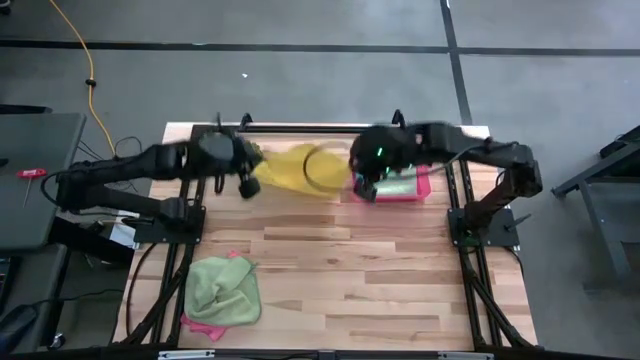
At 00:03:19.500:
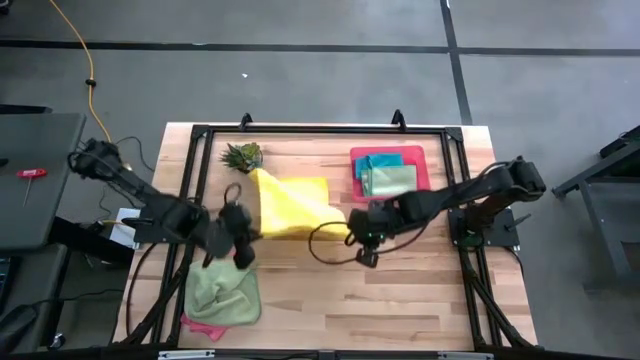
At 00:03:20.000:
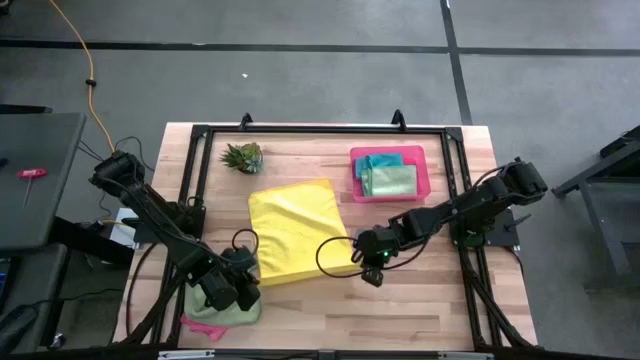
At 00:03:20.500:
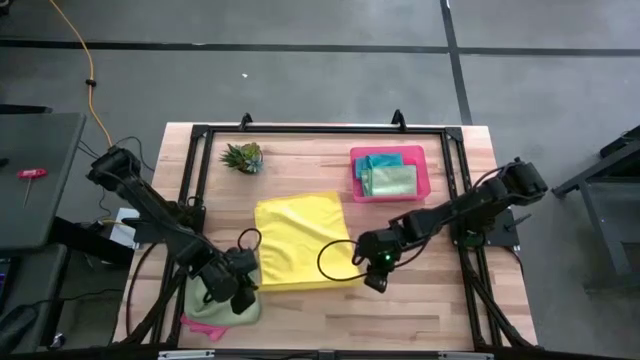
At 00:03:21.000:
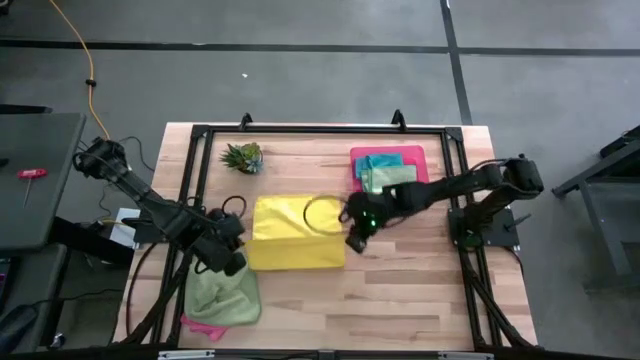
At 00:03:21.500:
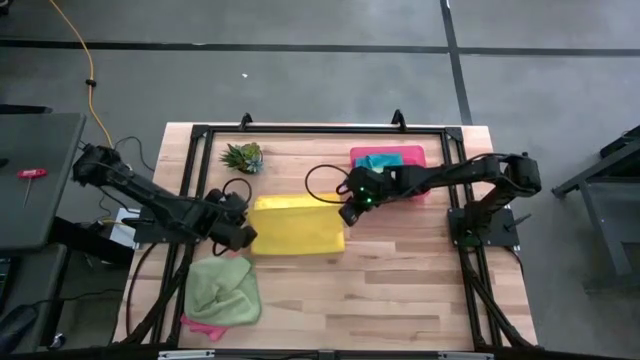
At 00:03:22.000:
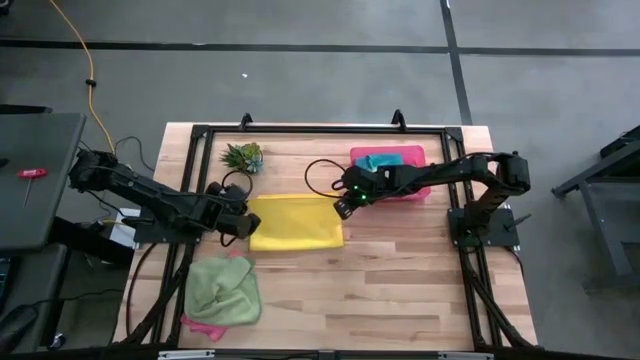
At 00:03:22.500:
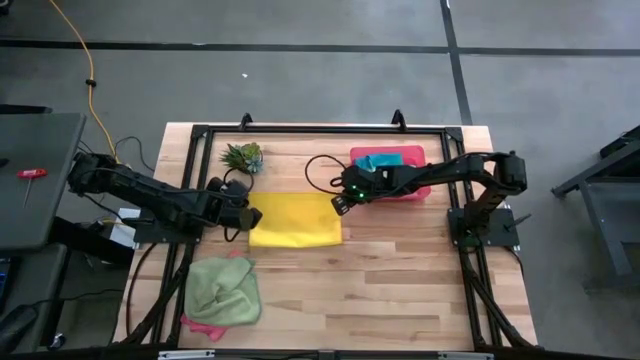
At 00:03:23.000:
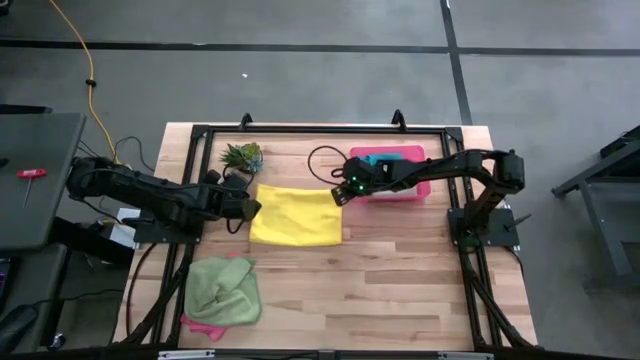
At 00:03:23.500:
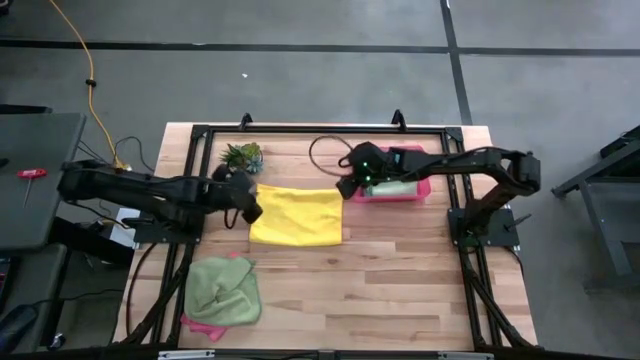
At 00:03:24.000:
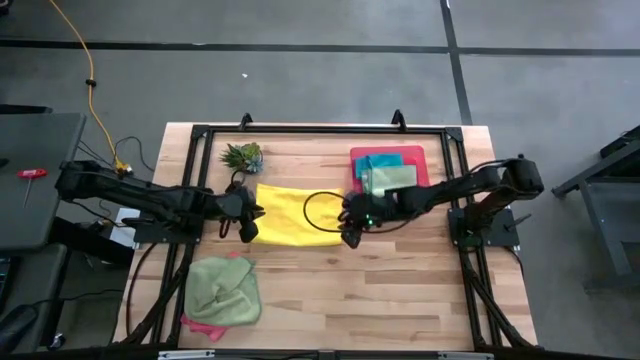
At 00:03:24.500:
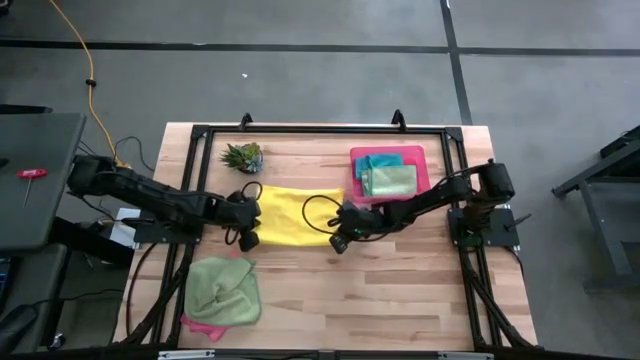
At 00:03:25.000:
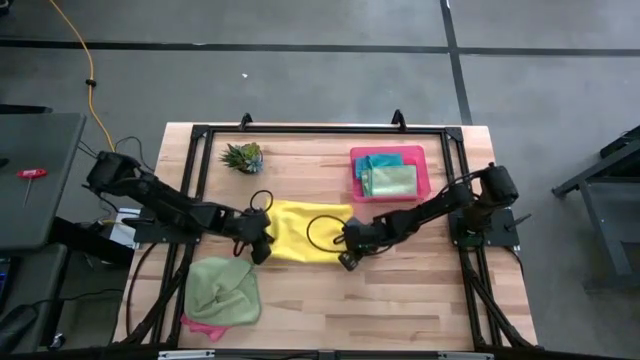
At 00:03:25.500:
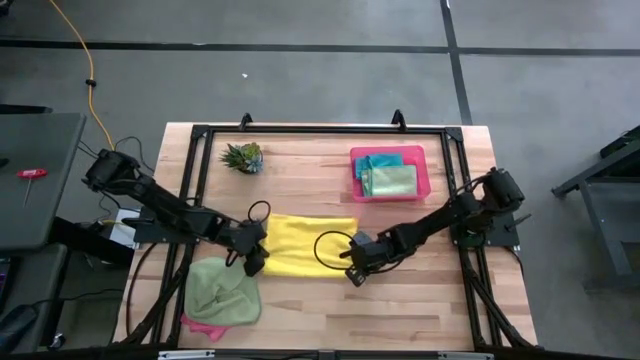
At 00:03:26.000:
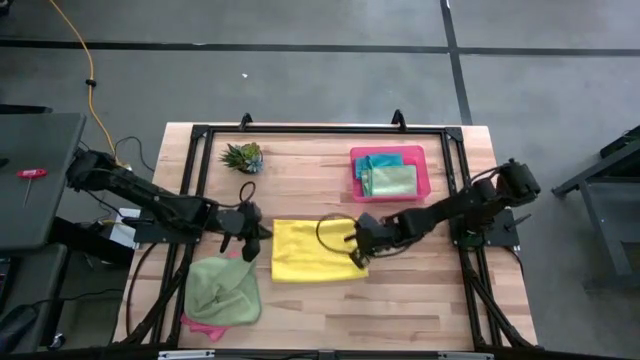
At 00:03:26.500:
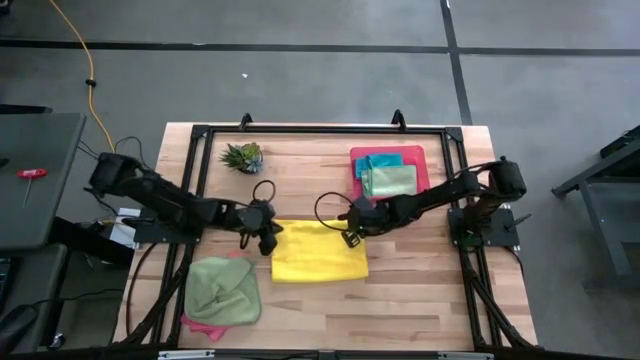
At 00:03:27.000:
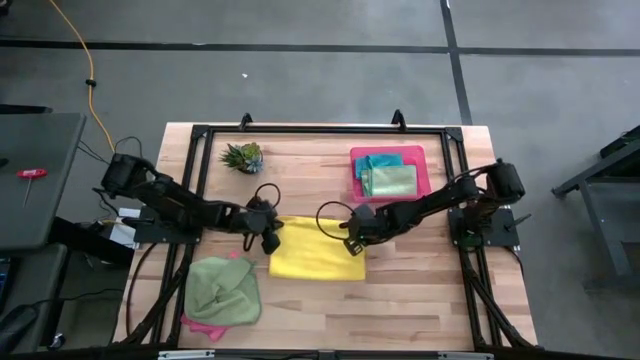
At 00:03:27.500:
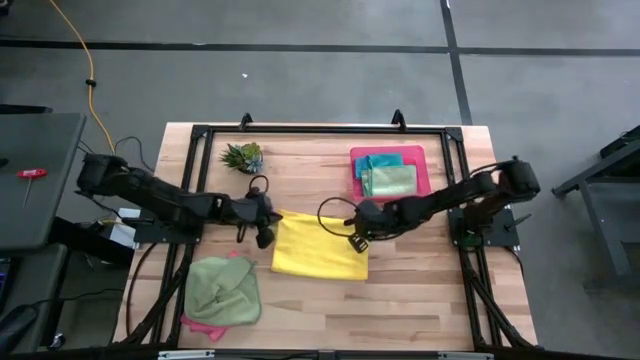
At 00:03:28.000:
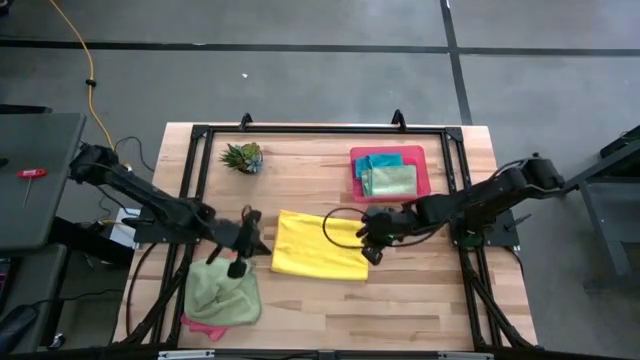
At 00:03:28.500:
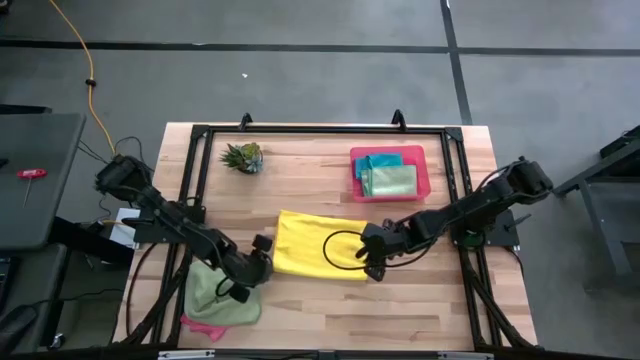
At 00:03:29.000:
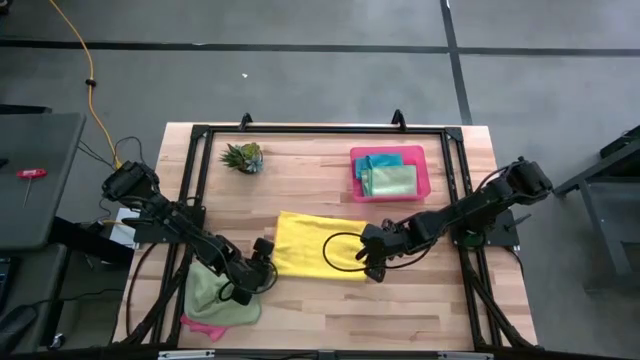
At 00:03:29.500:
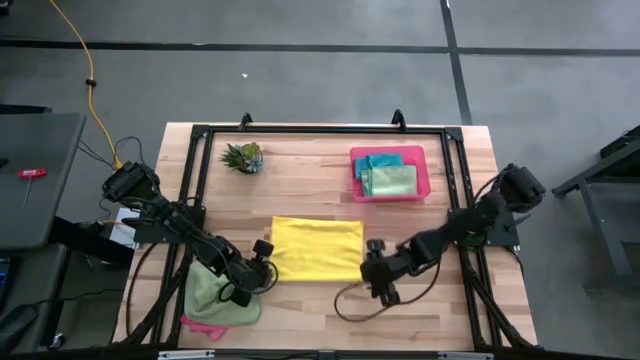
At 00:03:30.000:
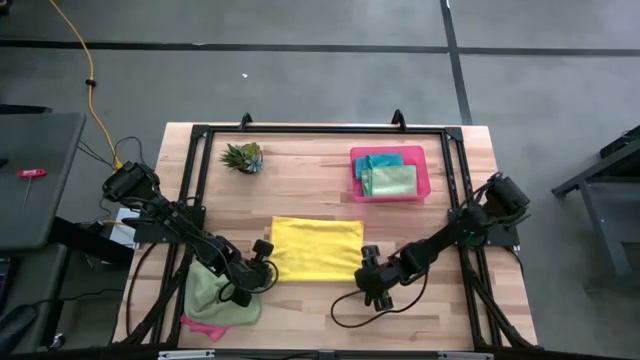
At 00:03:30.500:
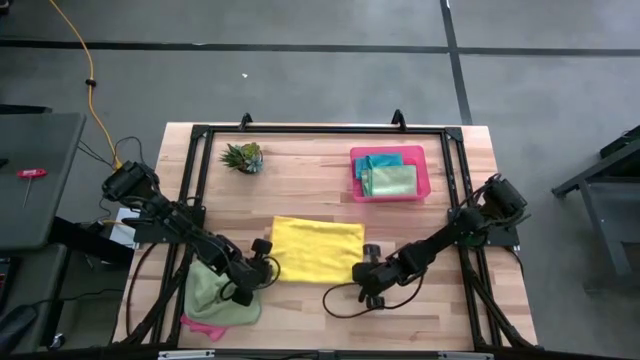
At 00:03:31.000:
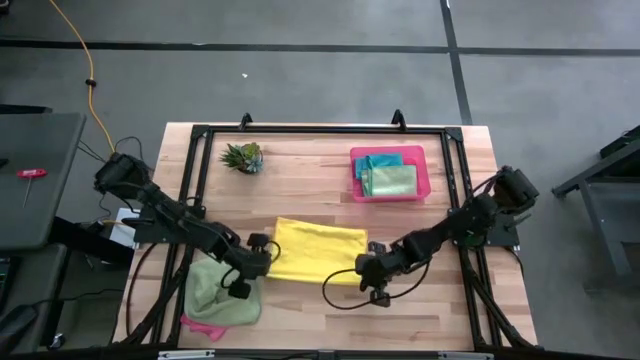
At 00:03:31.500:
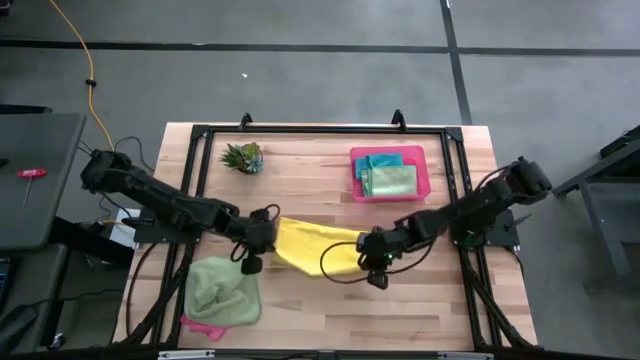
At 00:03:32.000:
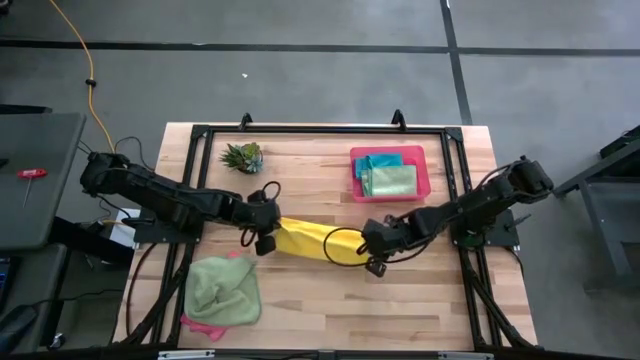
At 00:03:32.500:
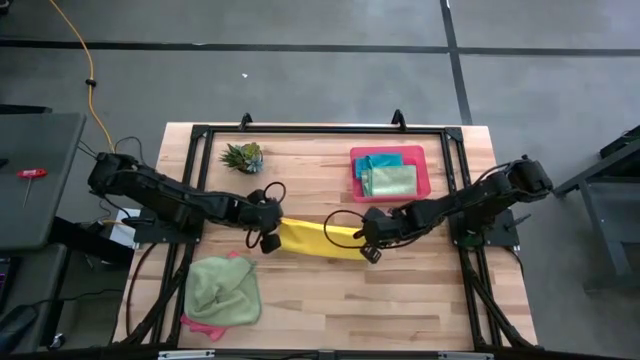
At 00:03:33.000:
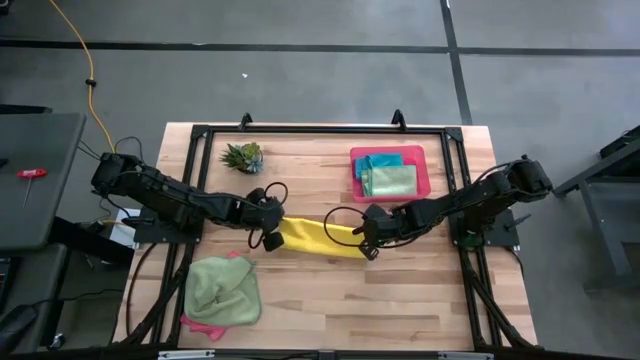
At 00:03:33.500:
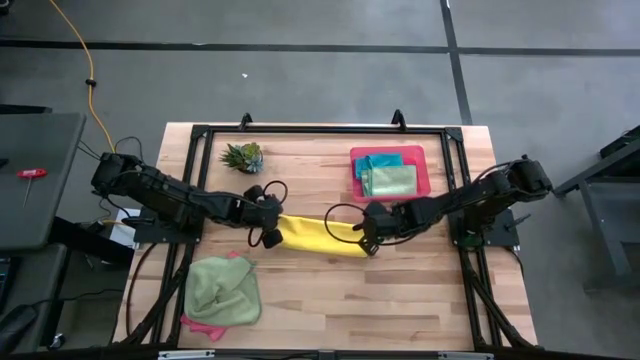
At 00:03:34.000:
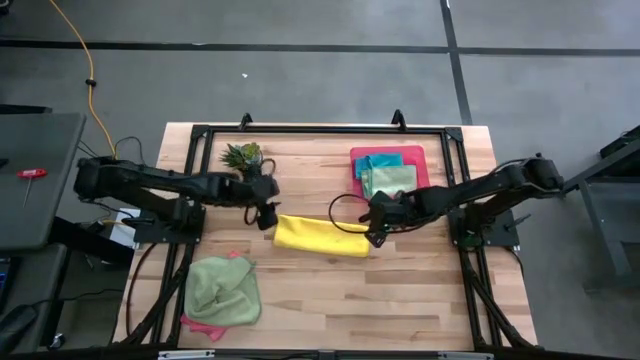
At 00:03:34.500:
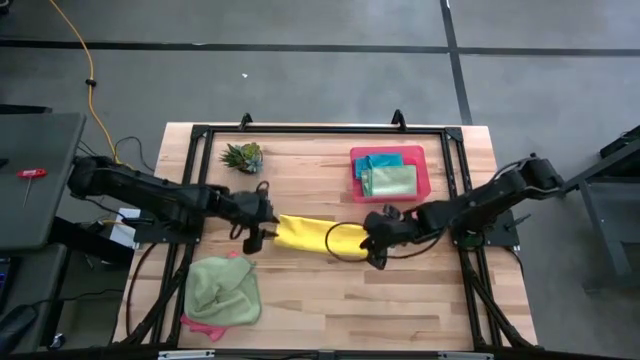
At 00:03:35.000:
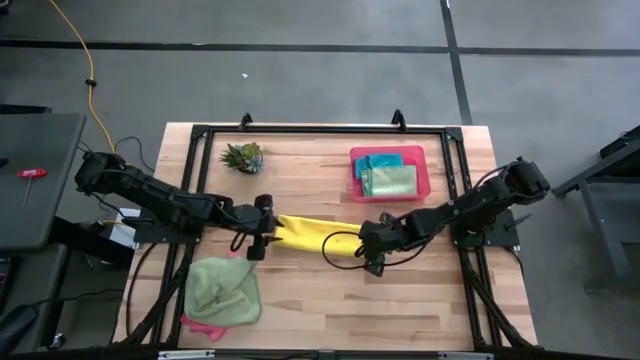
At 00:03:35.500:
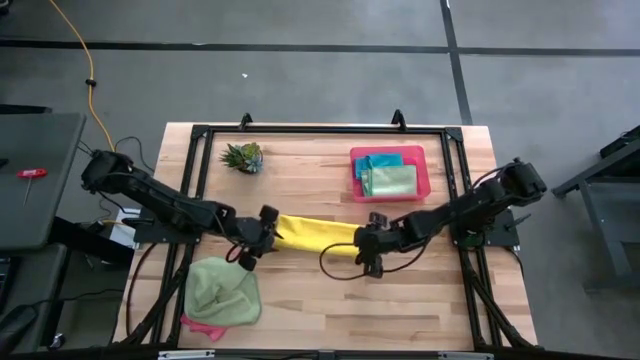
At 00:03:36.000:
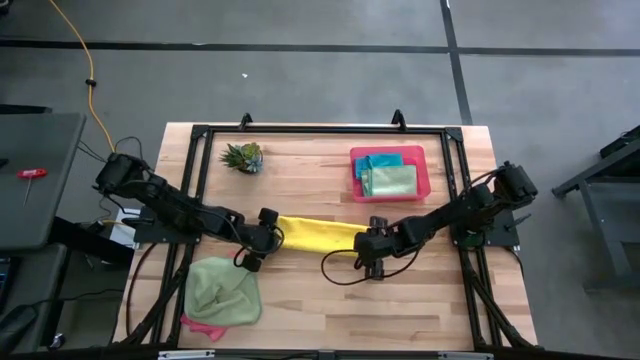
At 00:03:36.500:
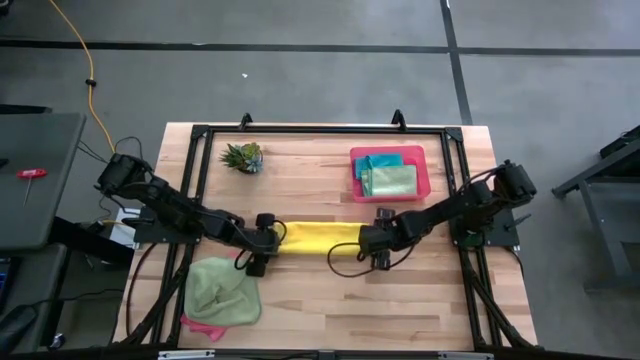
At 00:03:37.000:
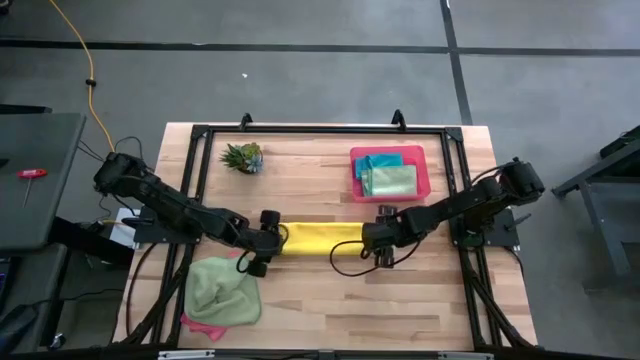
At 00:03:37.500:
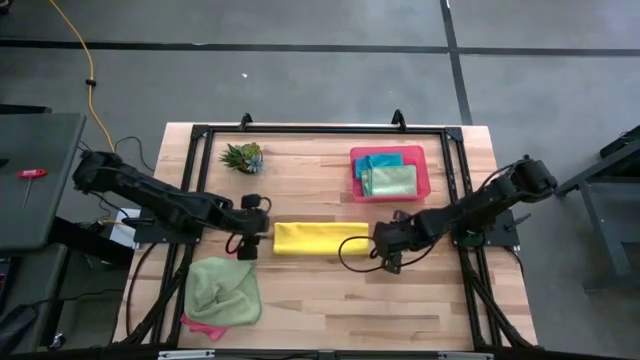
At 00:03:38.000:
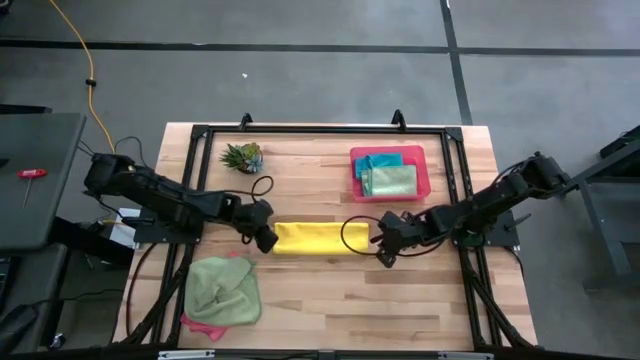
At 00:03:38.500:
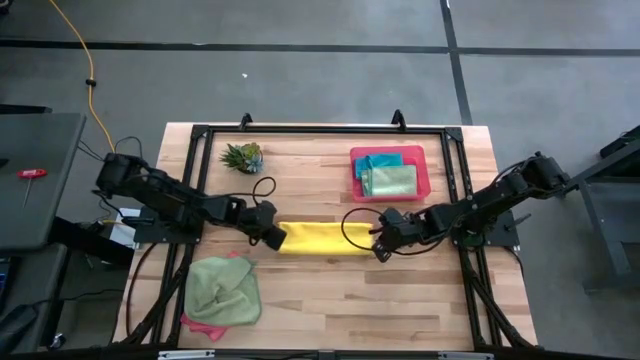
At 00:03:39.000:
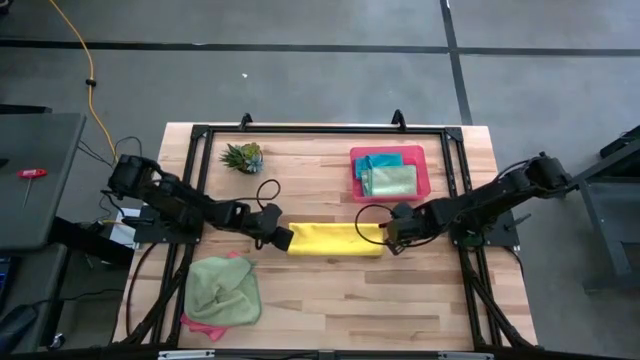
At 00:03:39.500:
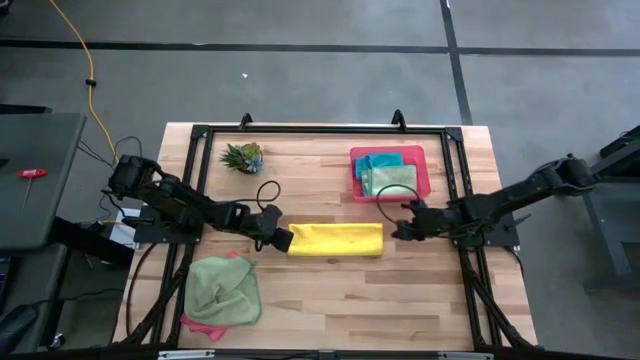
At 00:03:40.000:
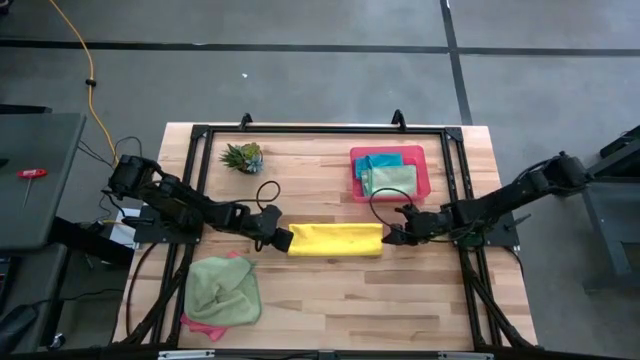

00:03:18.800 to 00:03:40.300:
Task: Fold microfiber towels
Fold the yellow microfiber cloth
